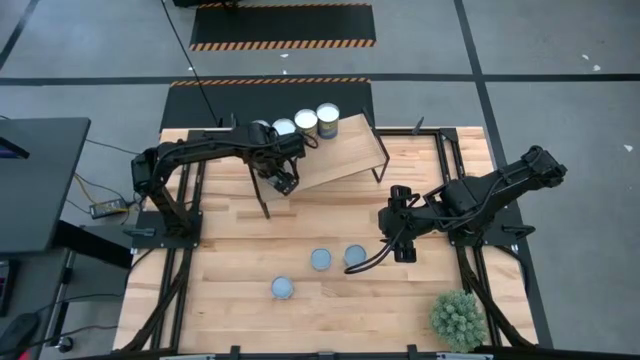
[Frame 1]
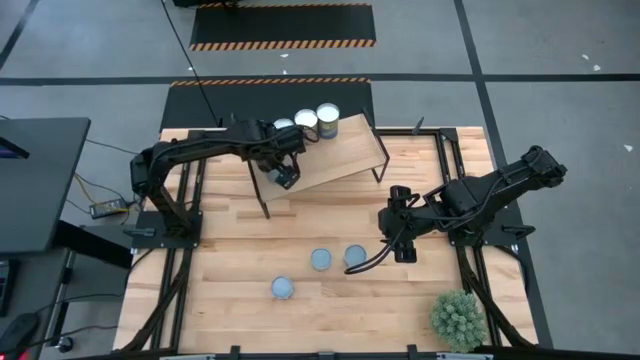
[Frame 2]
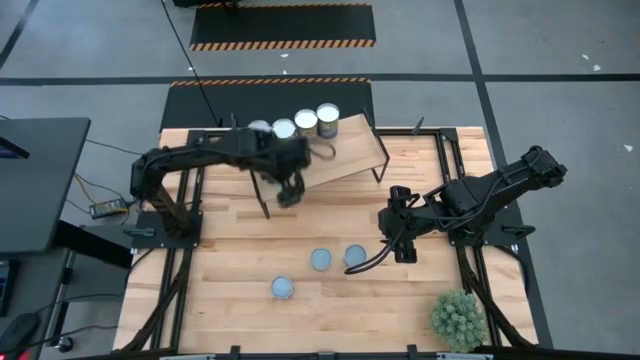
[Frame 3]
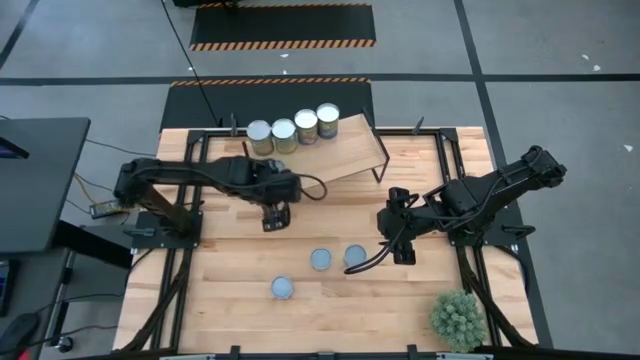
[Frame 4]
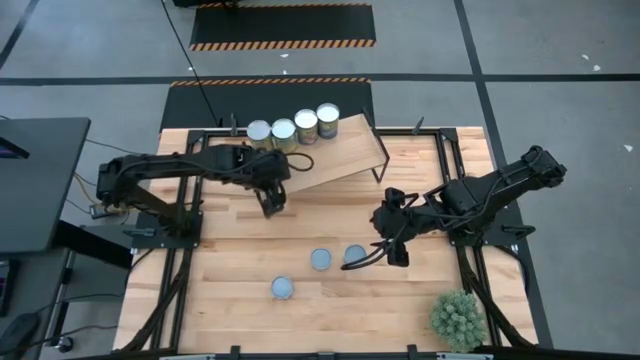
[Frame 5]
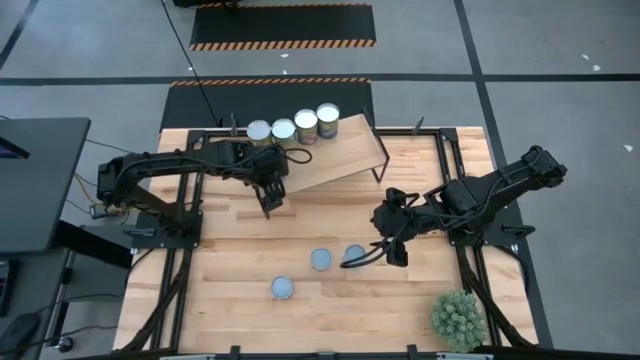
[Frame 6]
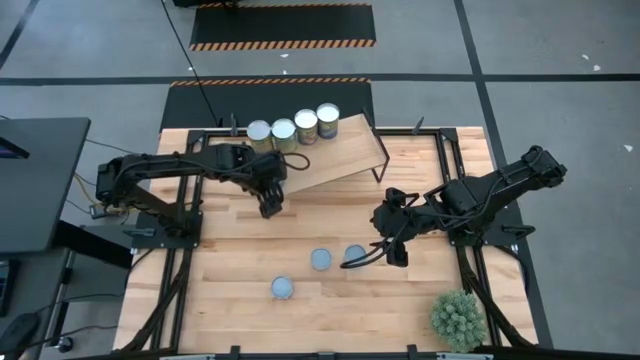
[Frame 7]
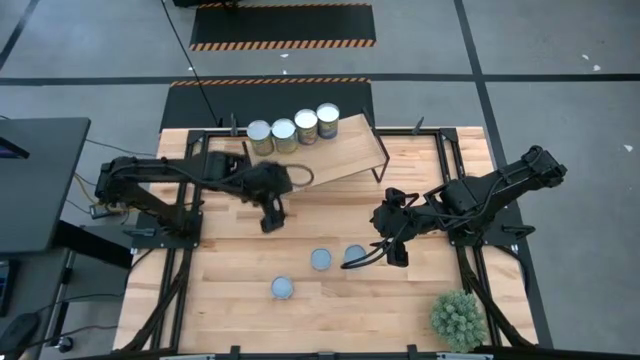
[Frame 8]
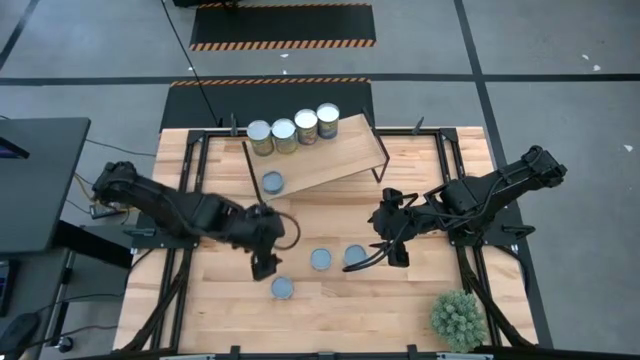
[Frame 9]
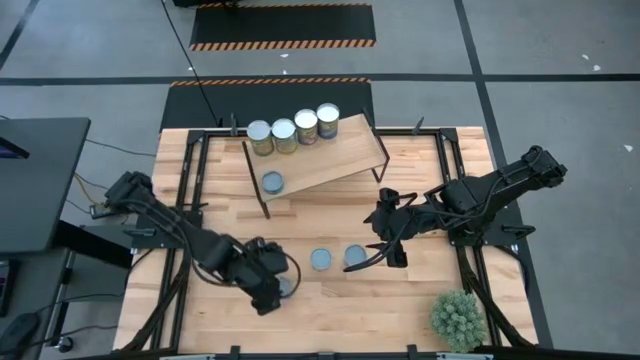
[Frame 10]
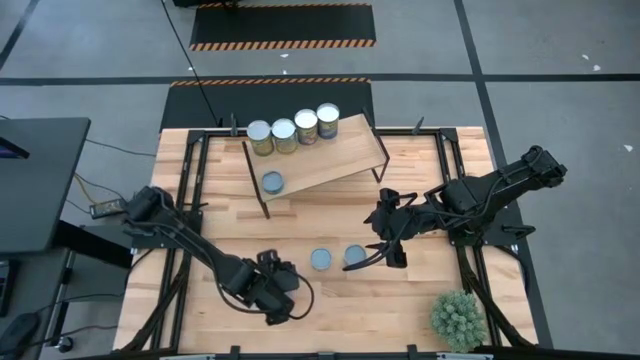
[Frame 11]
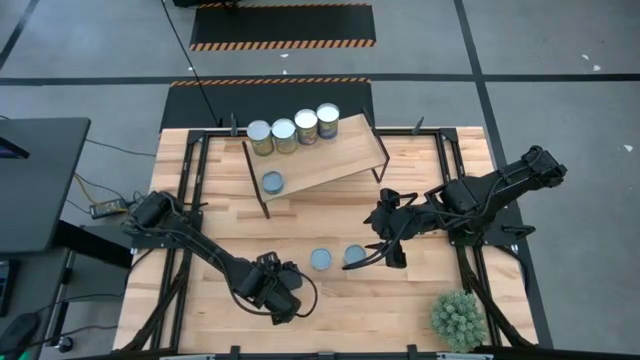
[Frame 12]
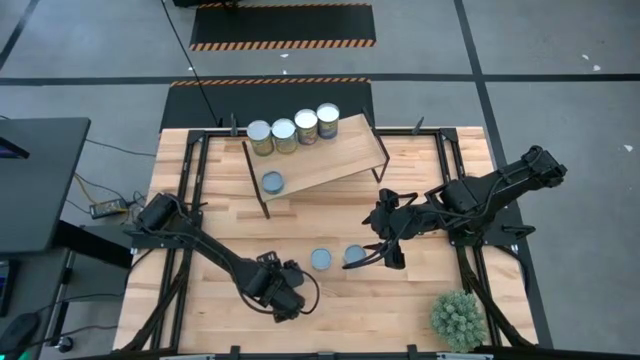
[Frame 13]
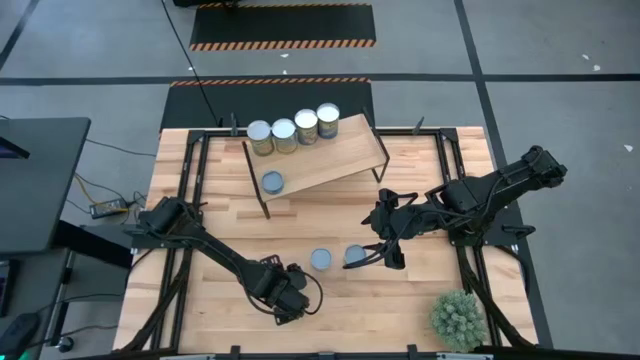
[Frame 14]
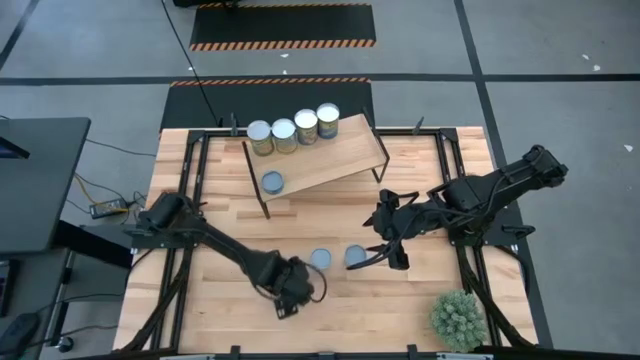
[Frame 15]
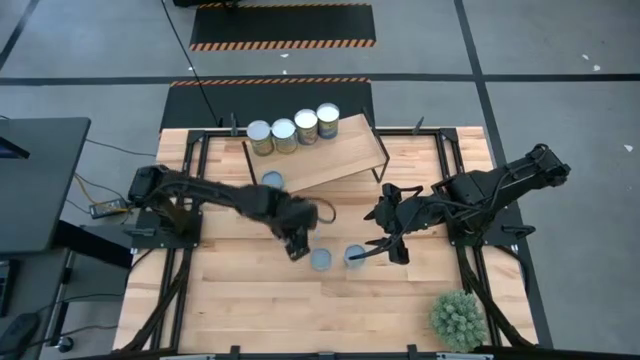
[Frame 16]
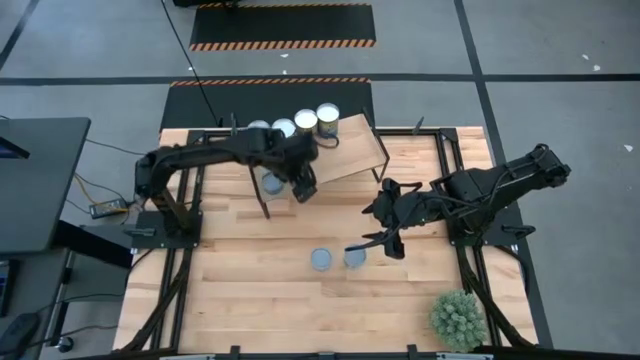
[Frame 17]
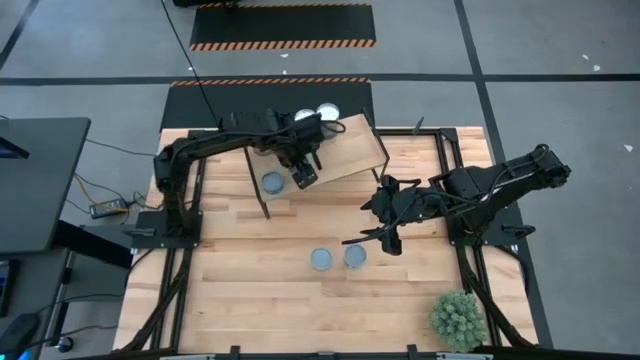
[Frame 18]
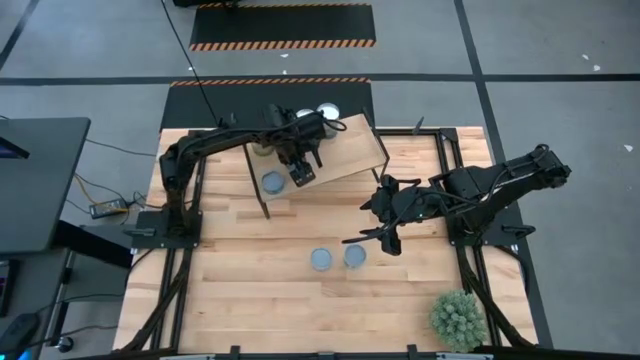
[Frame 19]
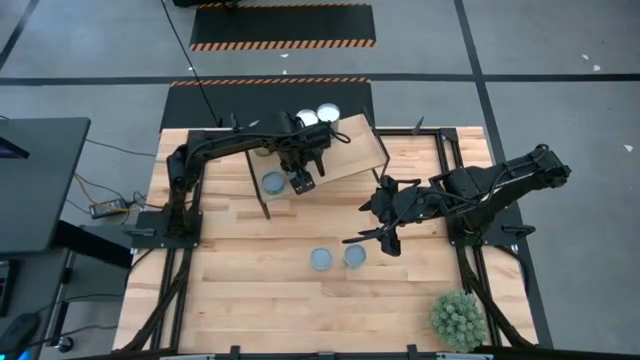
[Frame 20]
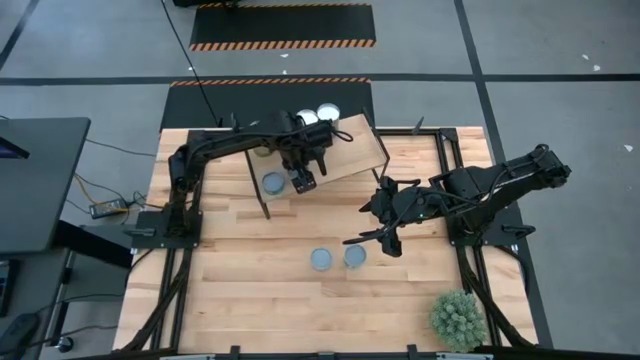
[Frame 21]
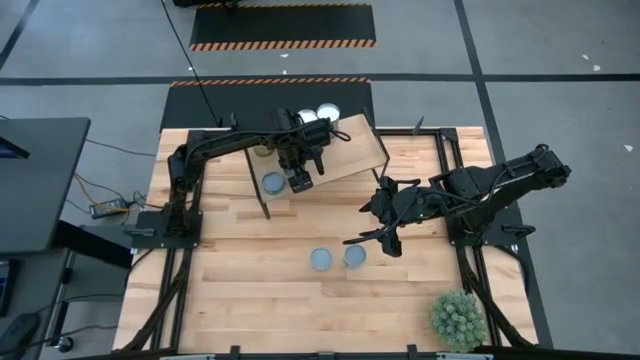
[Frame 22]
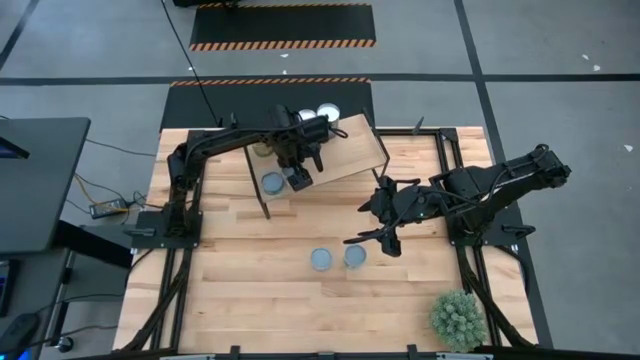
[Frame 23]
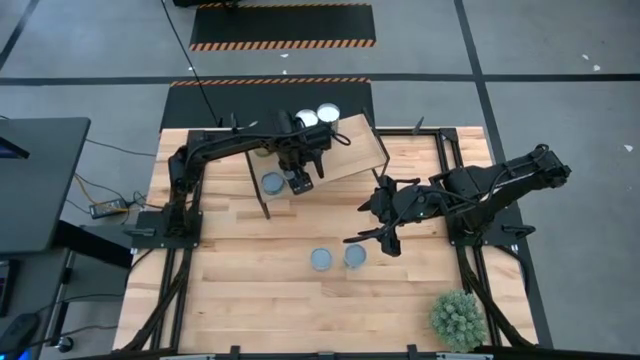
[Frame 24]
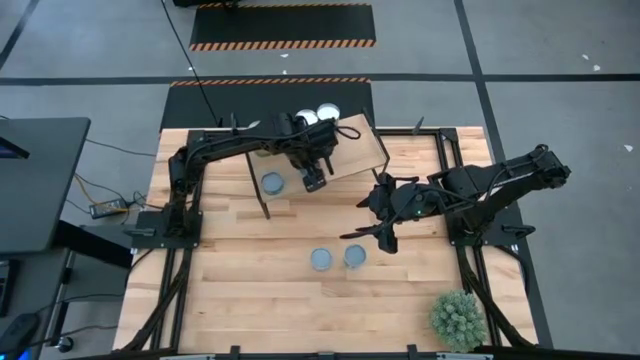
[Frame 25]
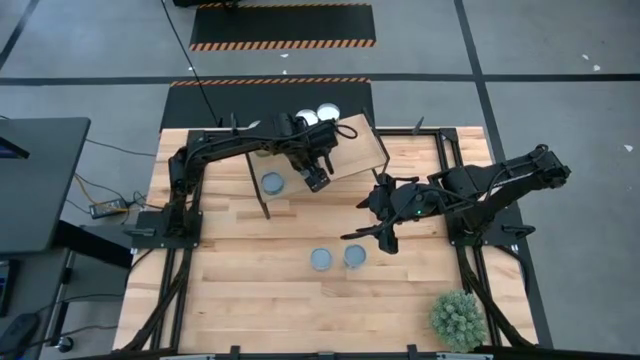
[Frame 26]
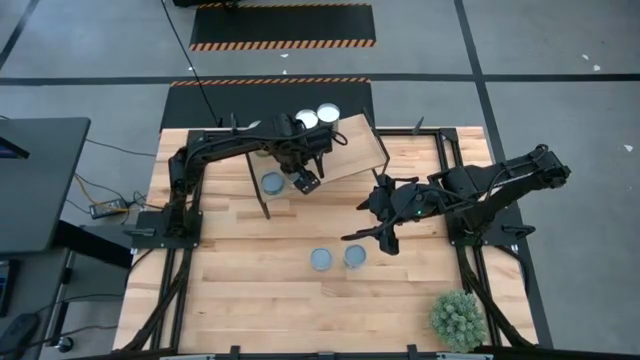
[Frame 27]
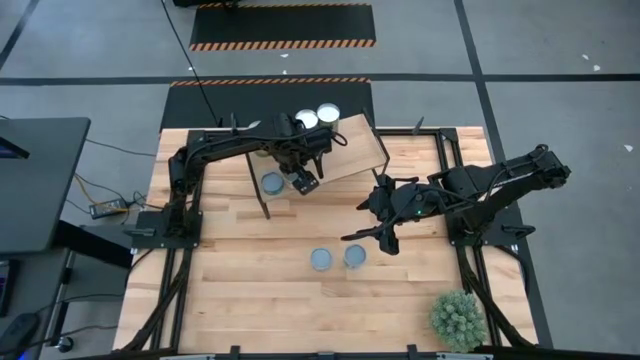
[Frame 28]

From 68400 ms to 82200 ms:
Task: Pick and place cans onto a shelf
Put the tomato can on the shelf

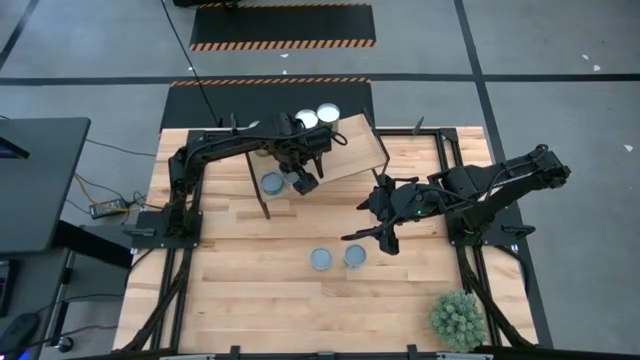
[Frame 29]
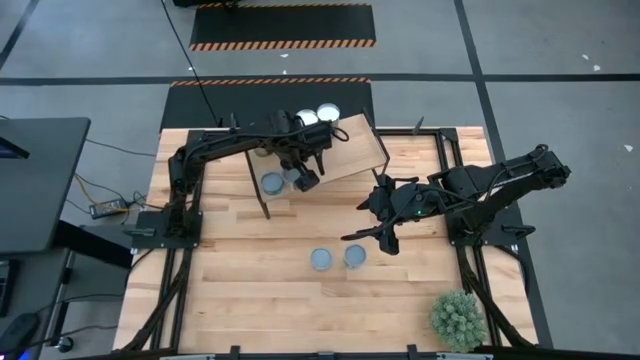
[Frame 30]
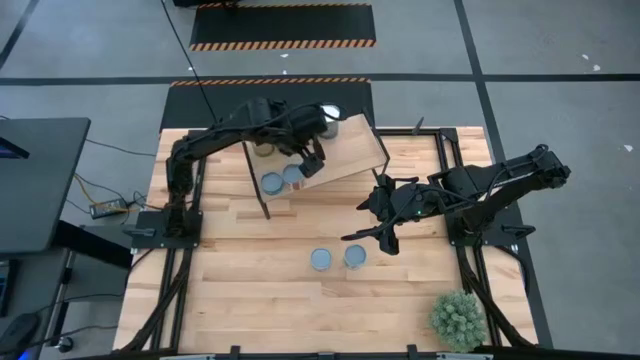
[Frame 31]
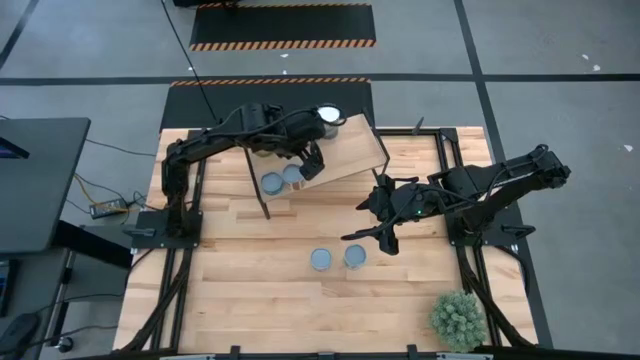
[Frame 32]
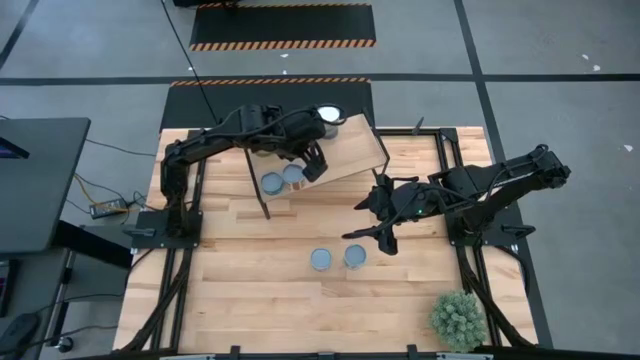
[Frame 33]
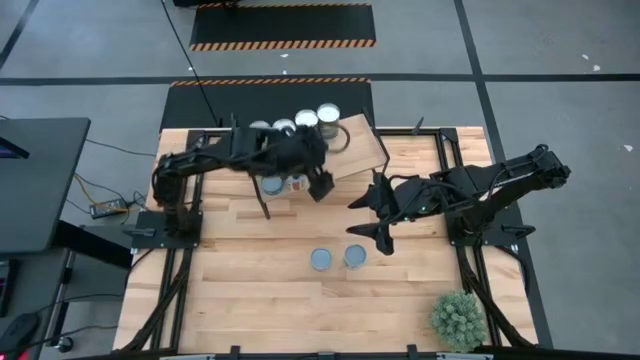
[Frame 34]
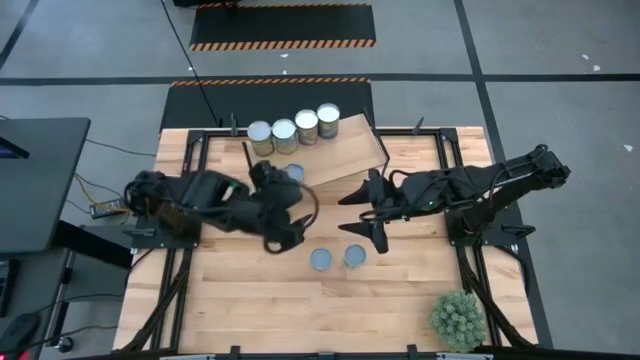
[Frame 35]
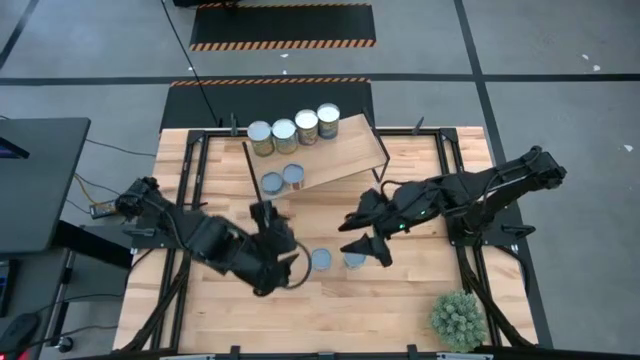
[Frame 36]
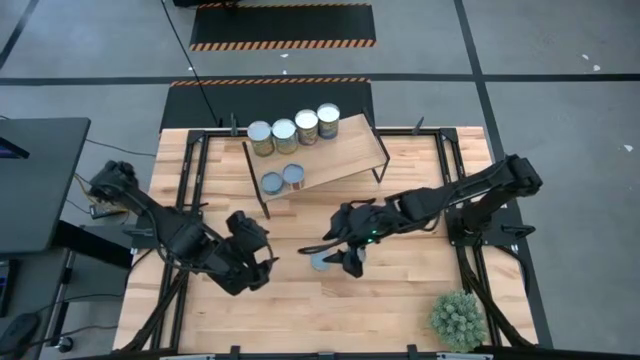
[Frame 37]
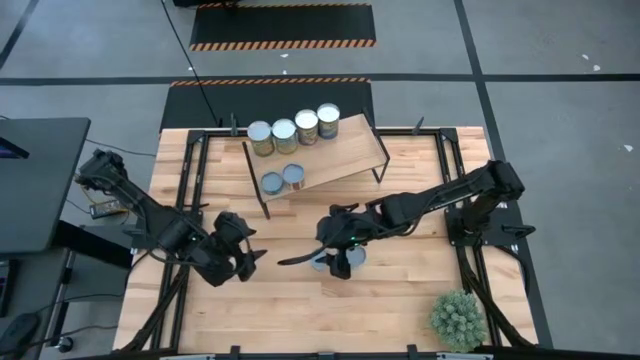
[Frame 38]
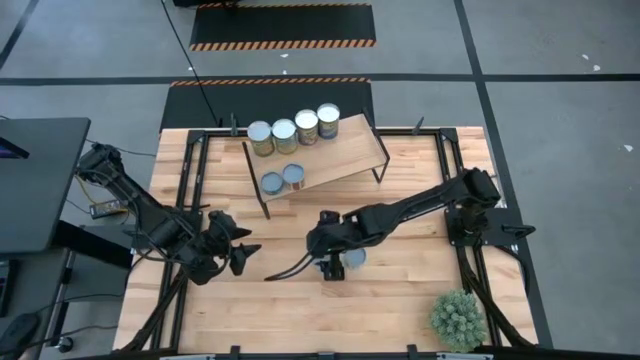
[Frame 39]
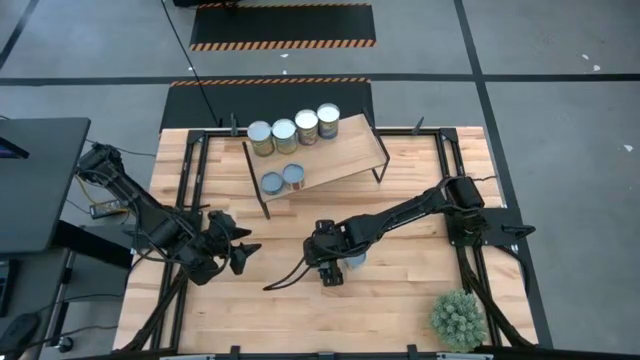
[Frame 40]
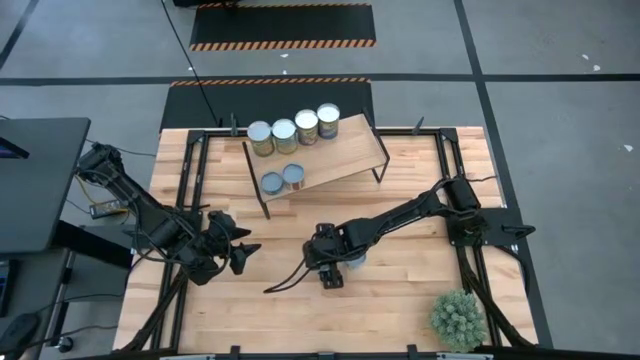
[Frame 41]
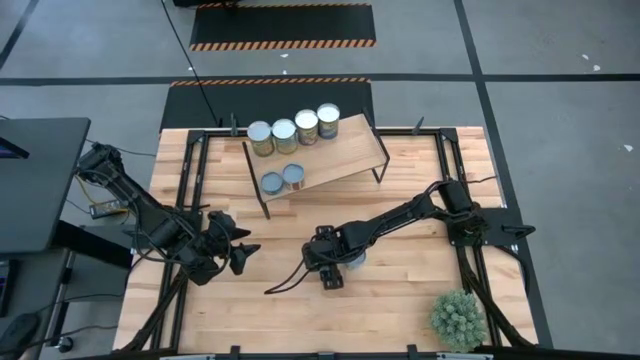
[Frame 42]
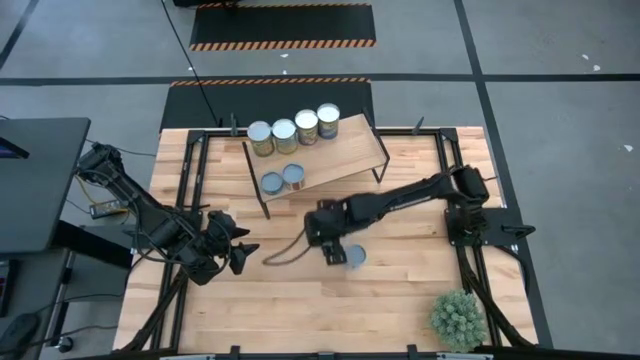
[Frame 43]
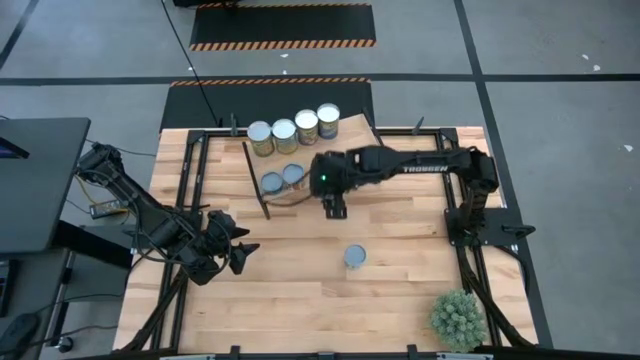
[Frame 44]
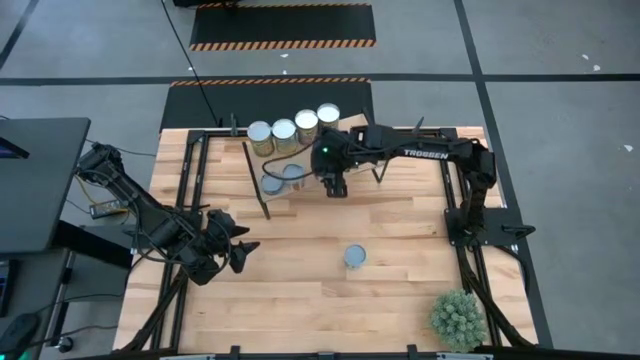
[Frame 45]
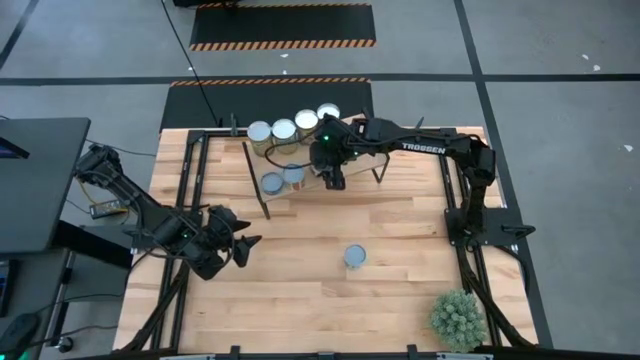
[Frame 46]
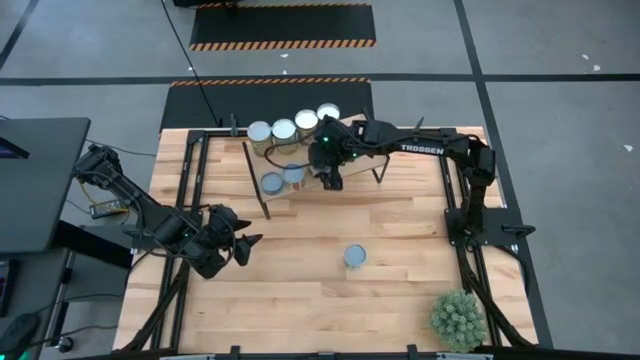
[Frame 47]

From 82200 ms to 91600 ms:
Put the green peas can on the shelf
